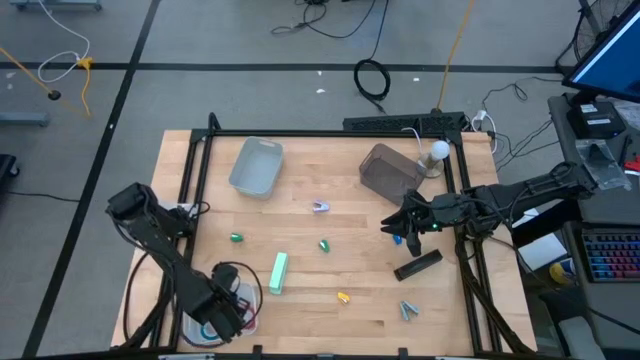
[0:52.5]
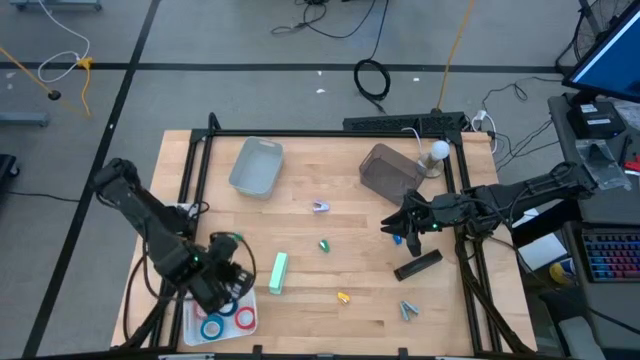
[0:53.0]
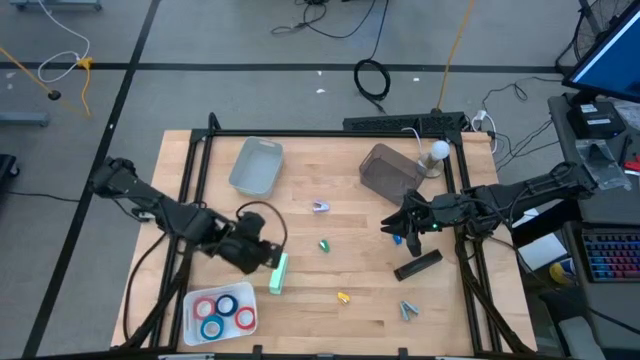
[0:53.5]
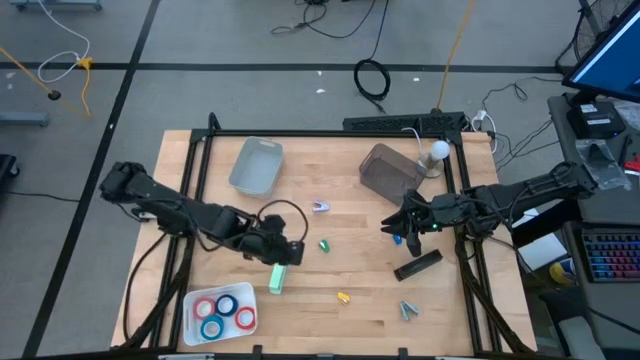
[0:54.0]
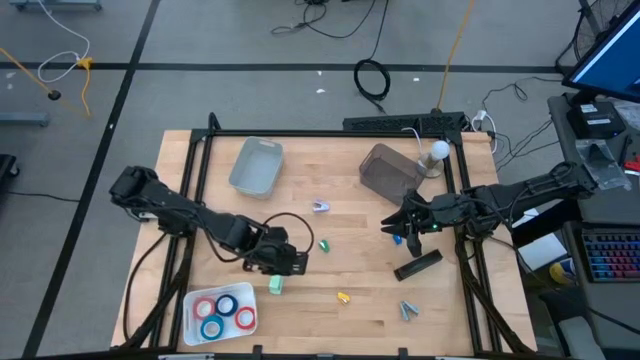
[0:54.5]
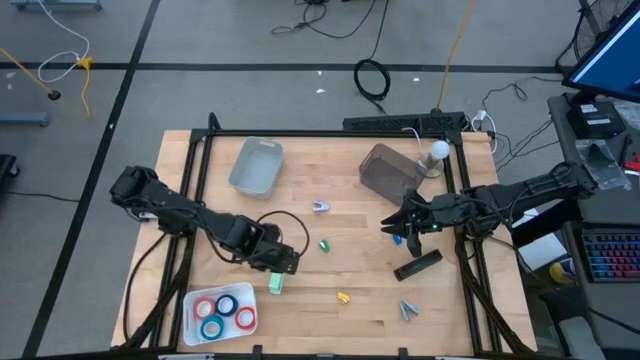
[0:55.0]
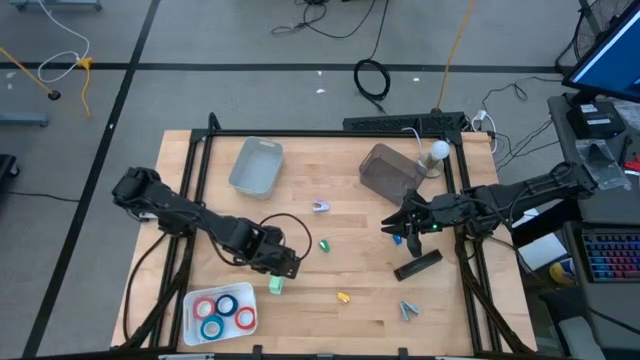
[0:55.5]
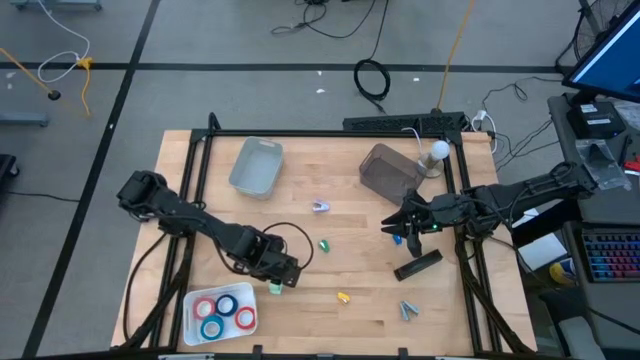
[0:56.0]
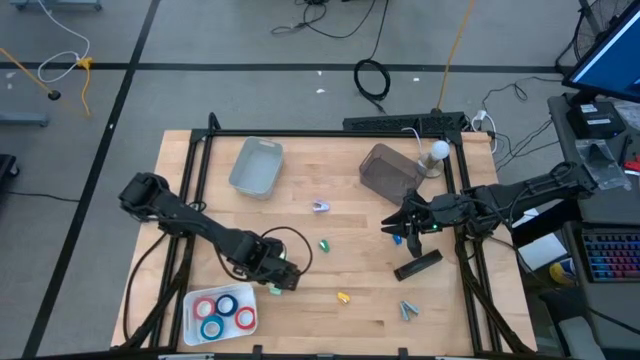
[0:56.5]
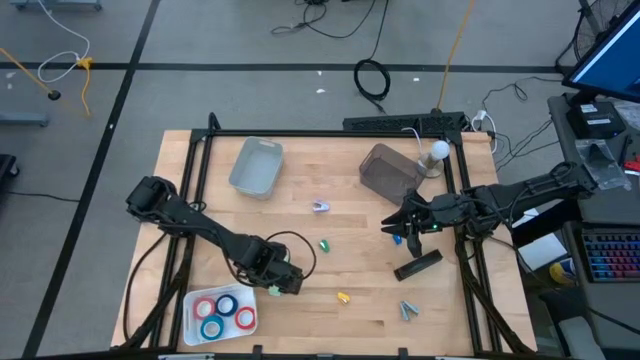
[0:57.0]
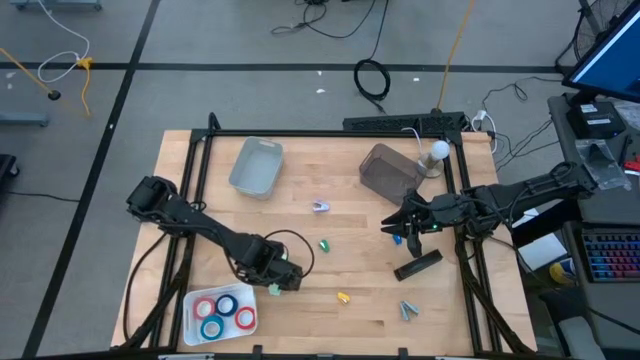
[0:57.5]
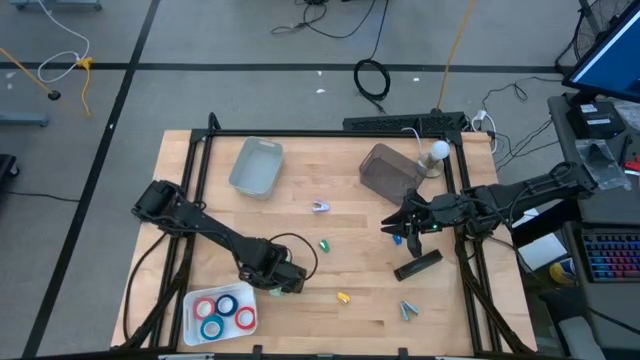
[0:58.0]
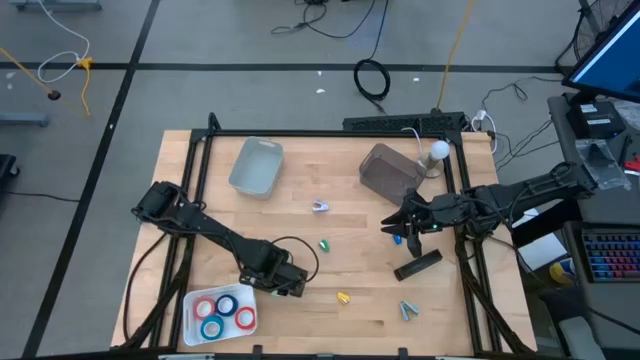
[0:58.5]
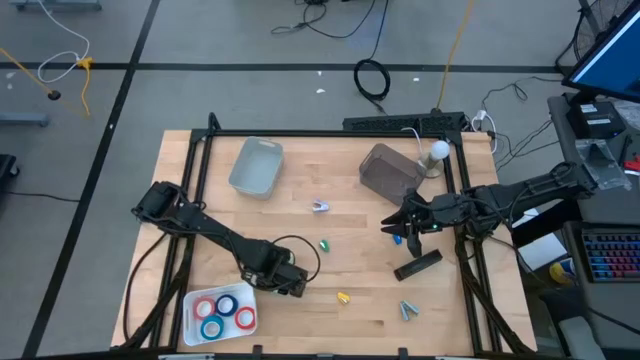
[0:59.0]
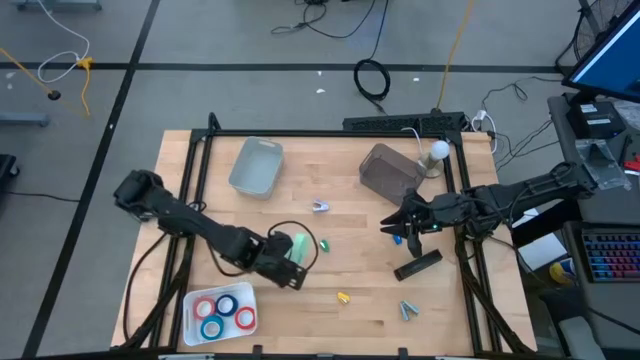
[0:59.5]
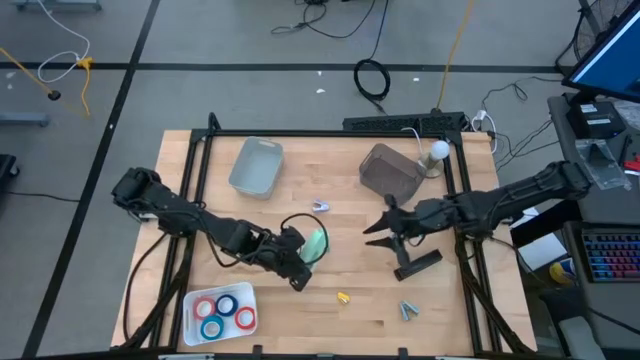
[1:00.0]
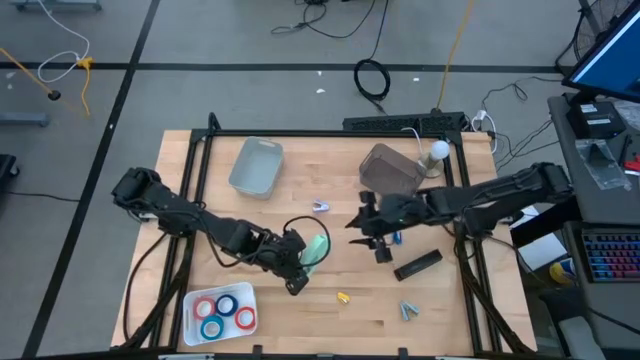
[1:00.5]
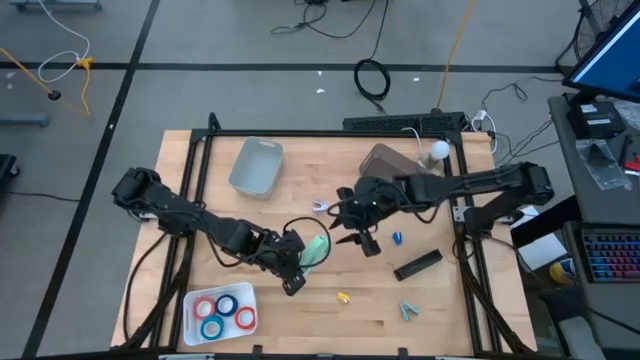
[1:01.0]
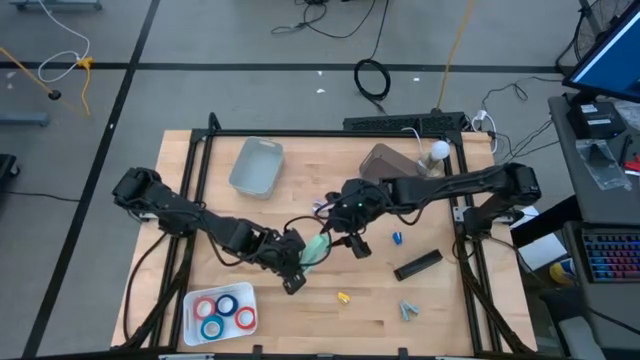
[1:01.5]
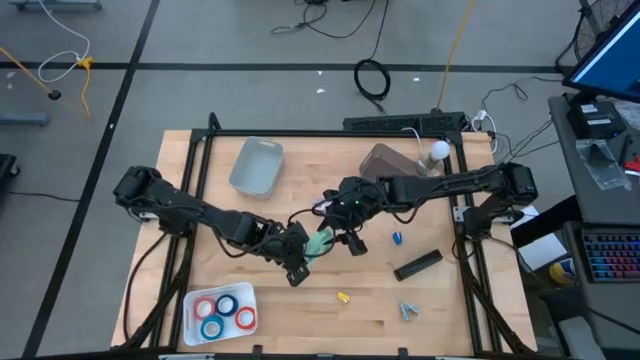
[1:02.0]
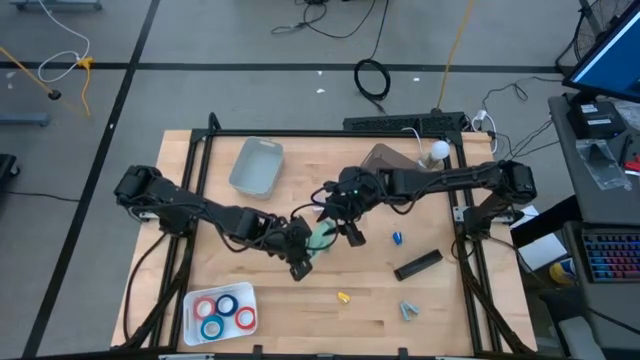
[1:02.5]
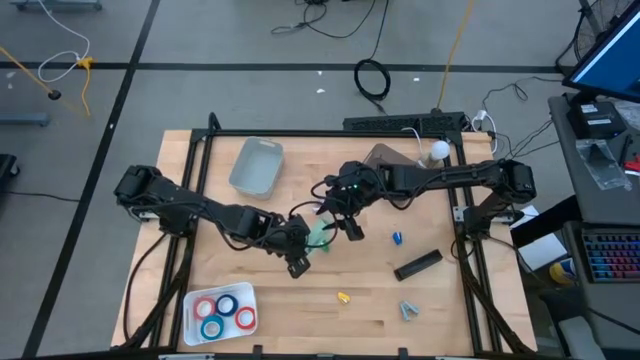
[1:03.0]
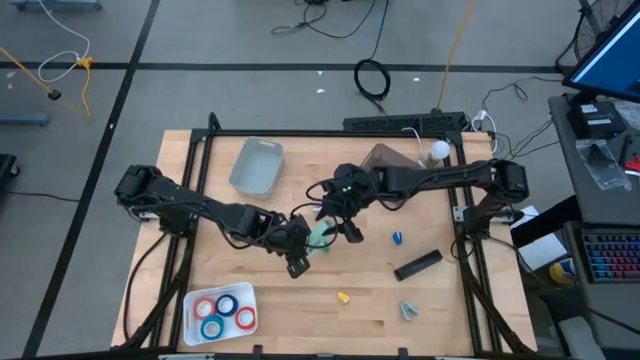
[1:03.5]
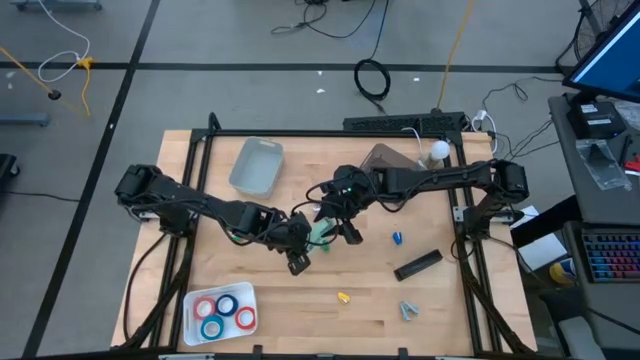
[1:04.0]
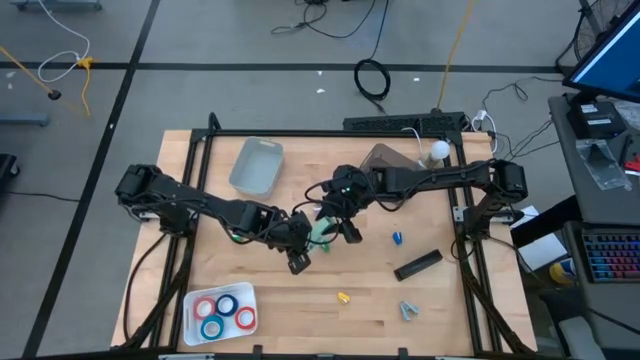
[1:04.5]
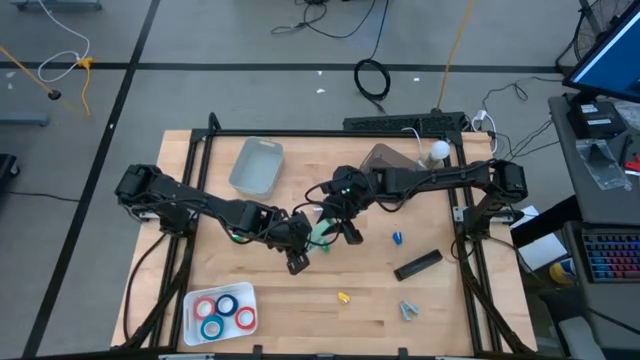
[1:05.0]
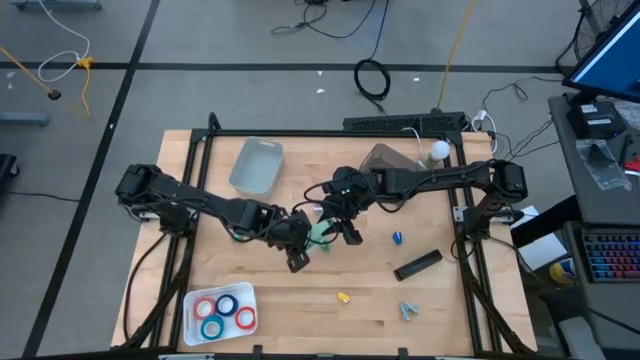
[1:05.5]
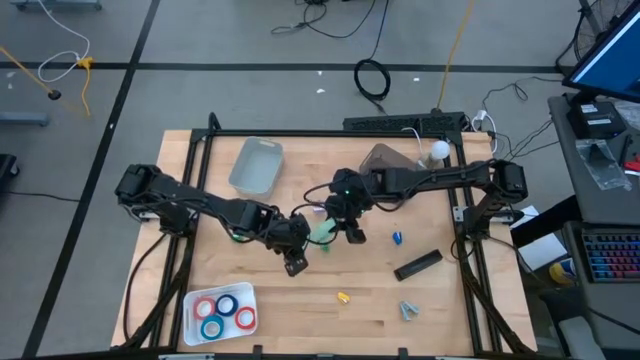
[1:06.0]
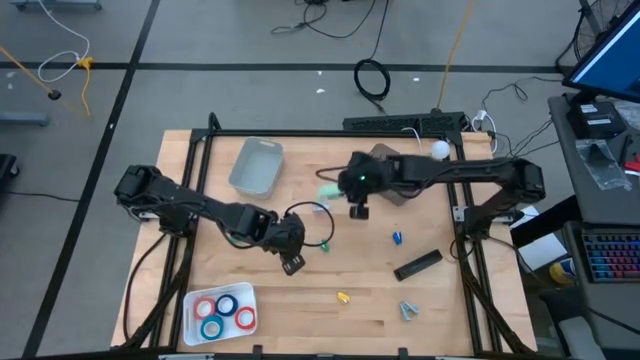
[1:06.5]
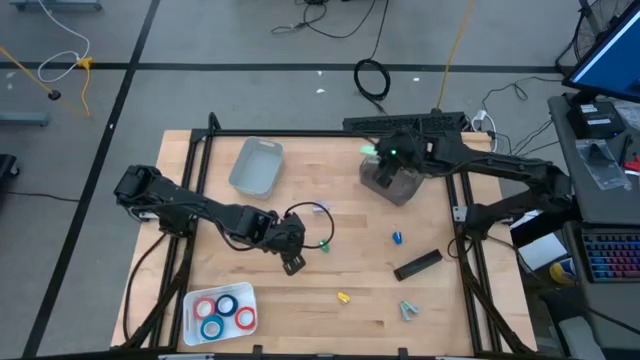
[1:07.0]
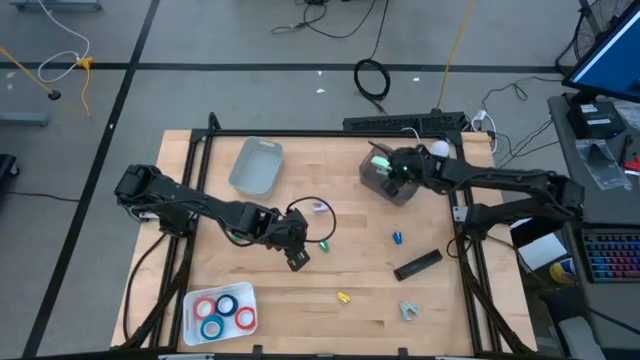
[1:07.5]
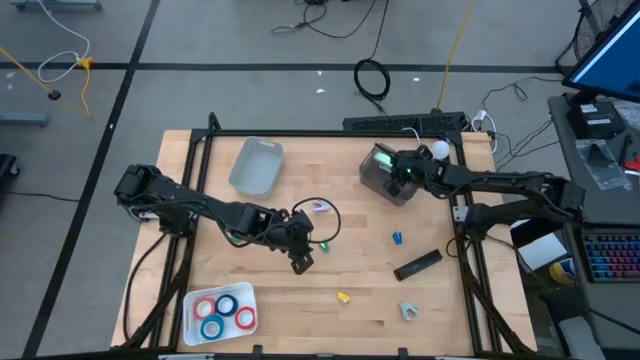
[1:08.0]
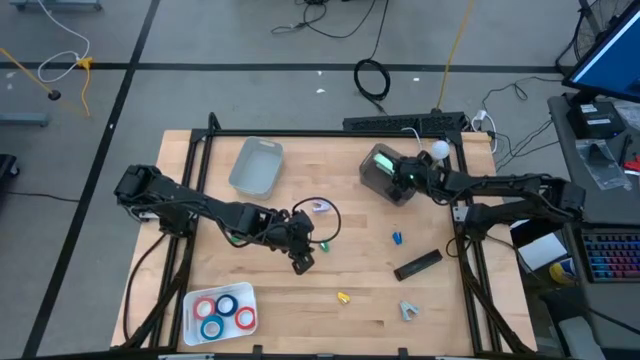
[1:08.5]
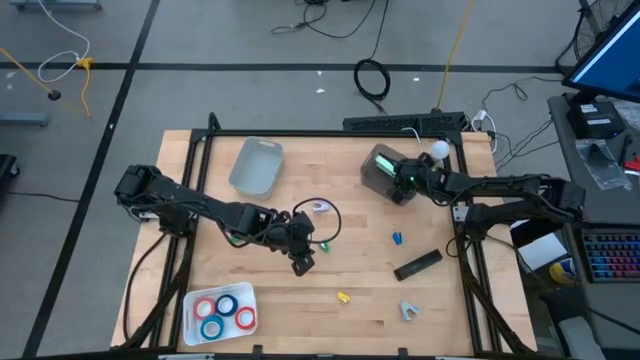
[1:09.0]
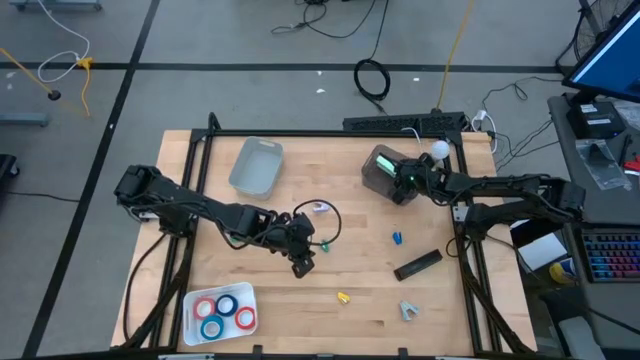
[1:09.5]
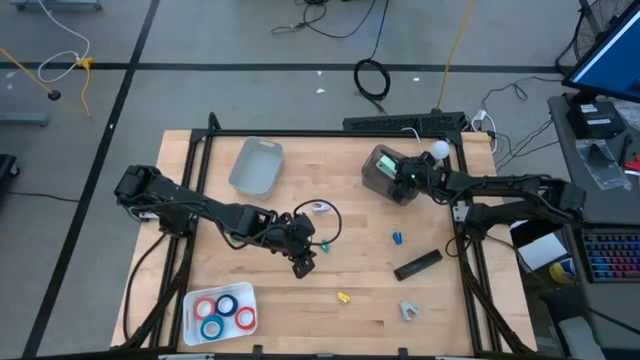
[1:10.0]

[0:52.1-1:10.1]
Task: Pick and place Stapler, Stapler remover, tape
Put the light green stapler into the black bin

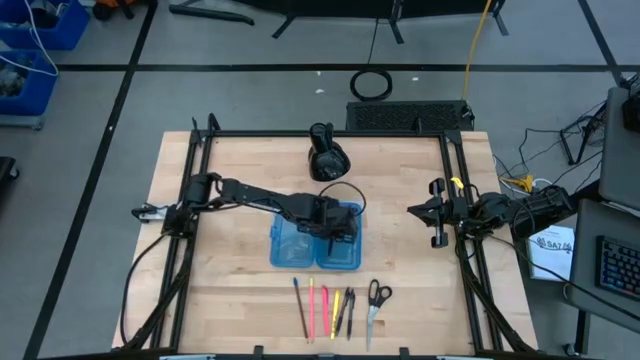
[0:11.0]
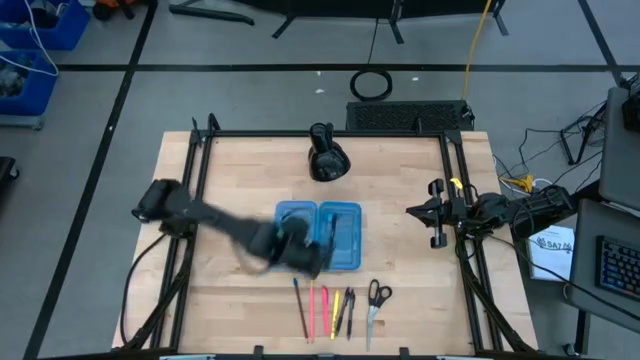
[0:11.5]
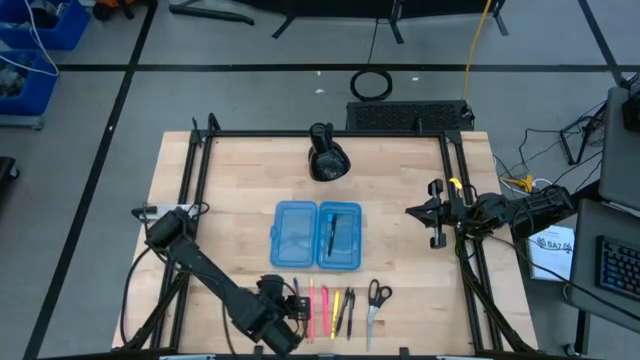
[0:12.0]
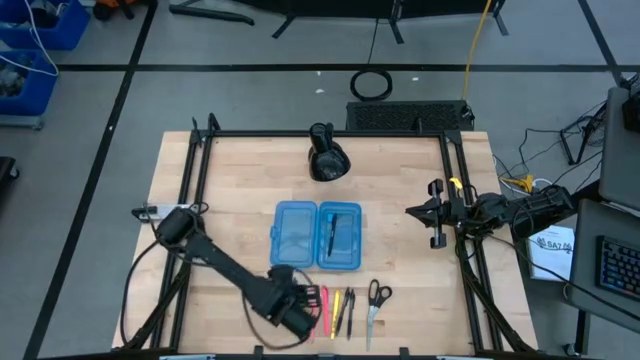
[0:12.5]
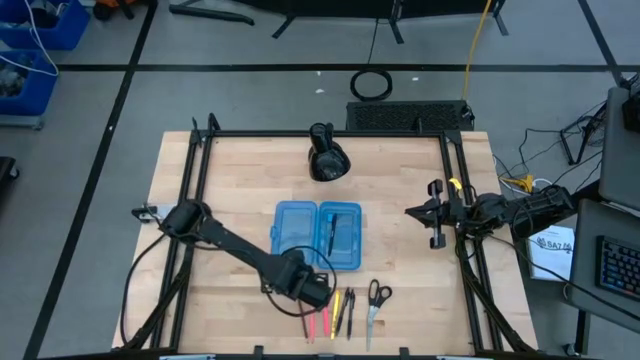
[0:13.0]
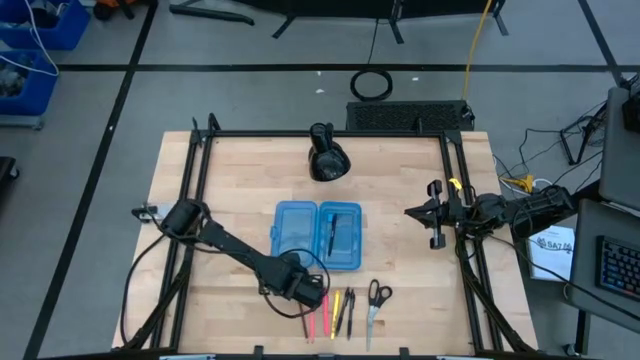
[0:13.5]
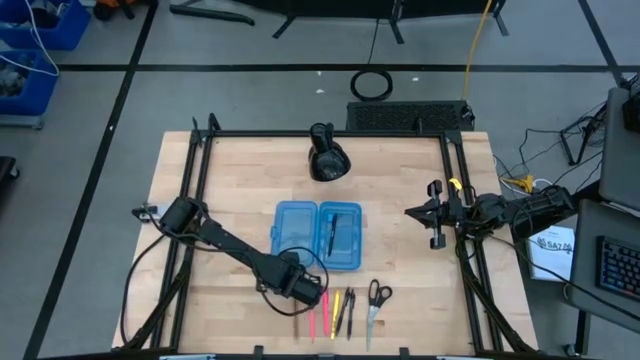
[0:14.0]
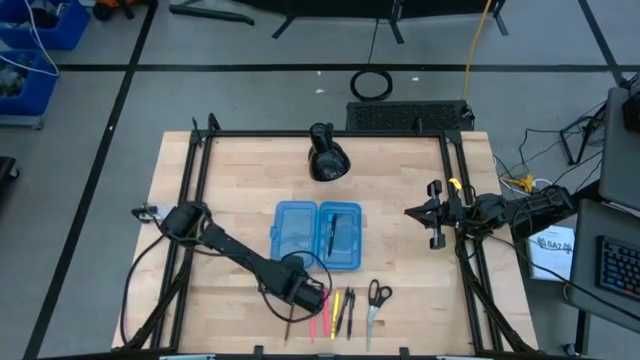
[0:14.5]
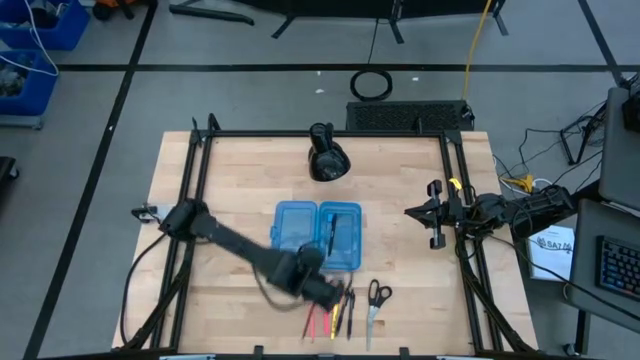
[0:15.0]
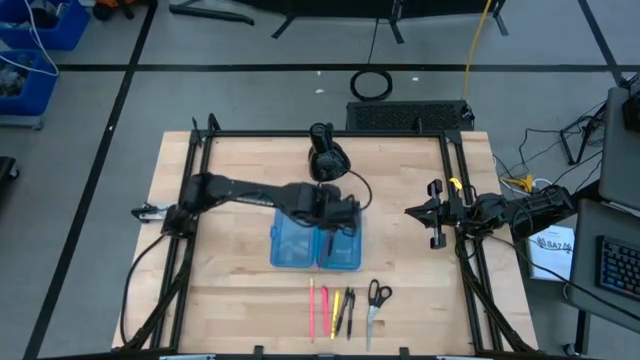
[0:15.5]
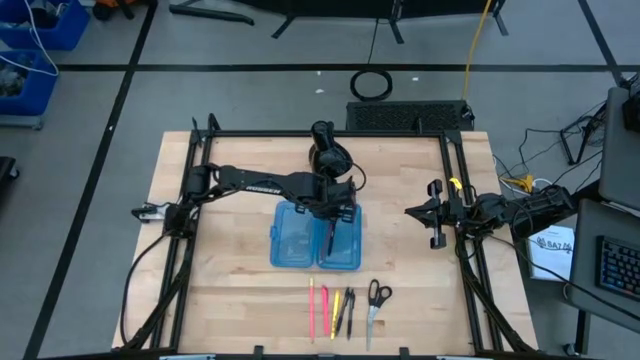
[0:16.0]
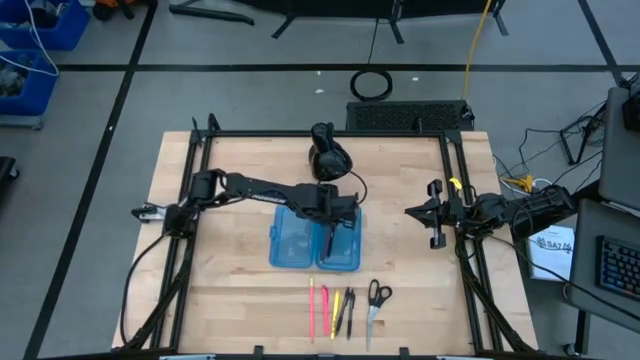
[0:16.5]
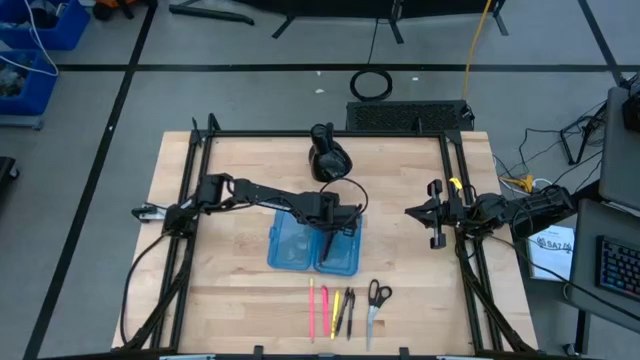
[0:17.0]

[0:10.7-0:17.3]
Task: Pick & place school supplies into a supply box
Put the brown pencil into the blue supply box
